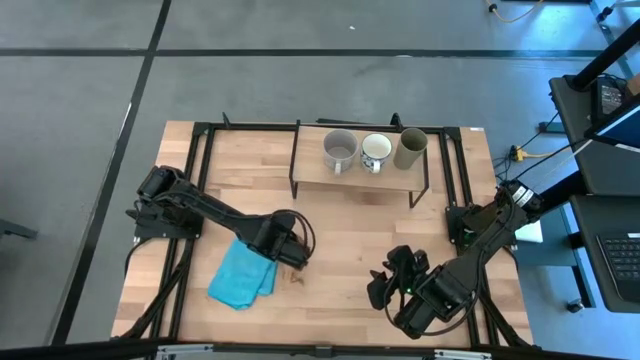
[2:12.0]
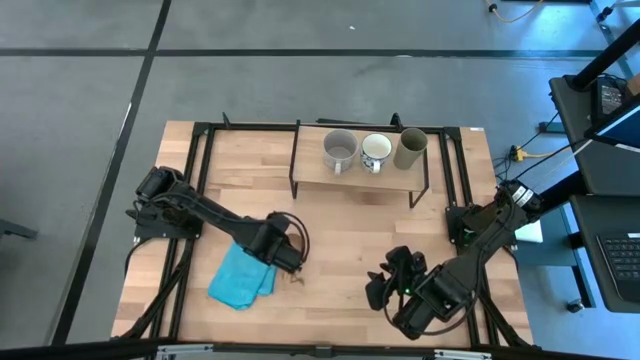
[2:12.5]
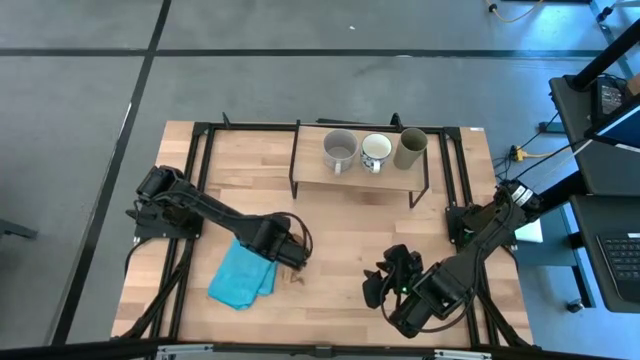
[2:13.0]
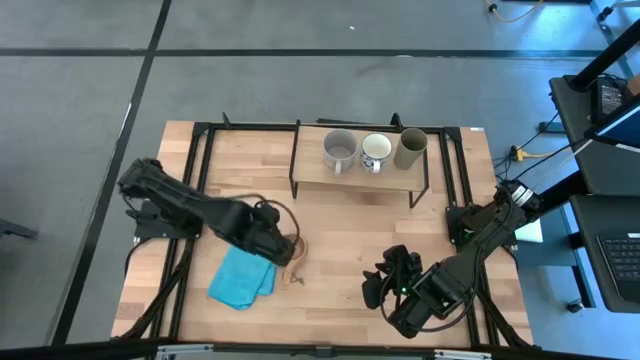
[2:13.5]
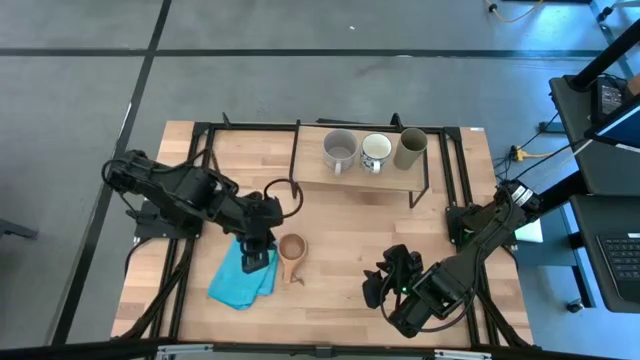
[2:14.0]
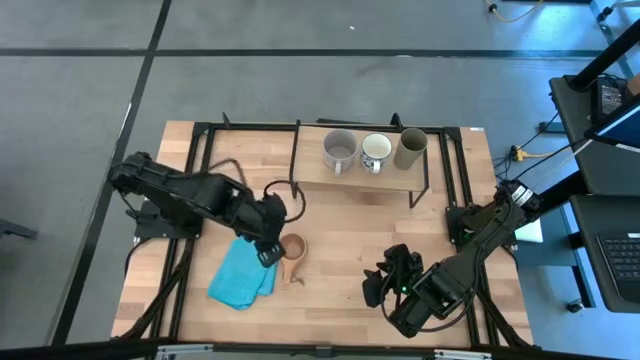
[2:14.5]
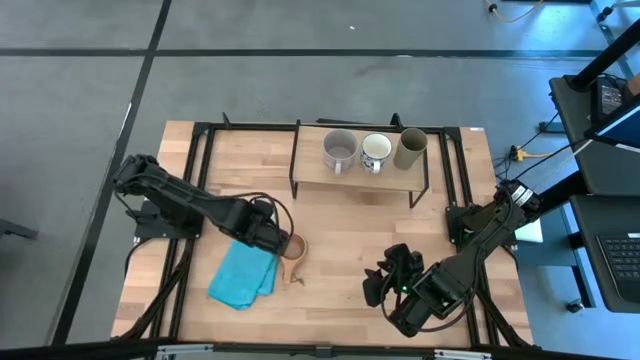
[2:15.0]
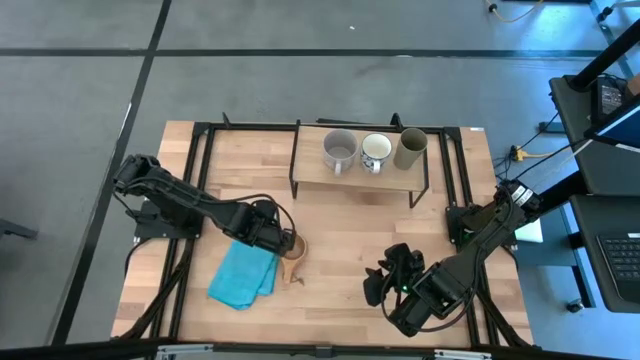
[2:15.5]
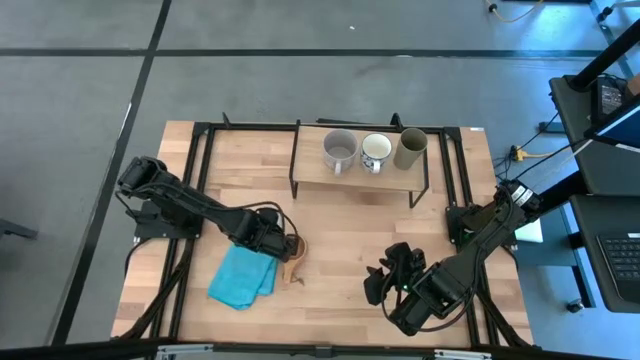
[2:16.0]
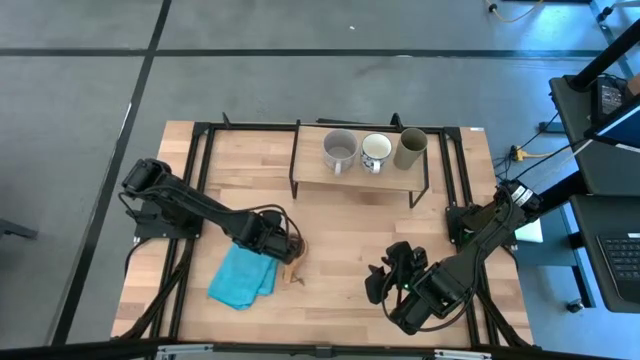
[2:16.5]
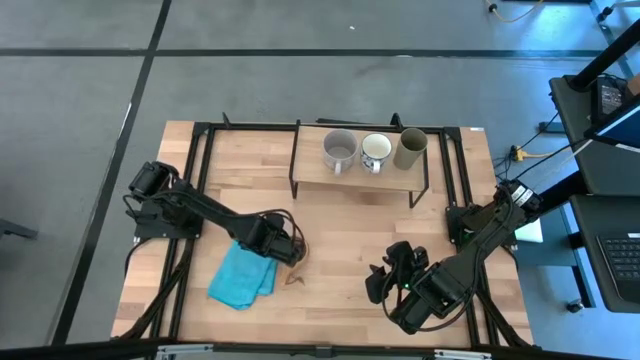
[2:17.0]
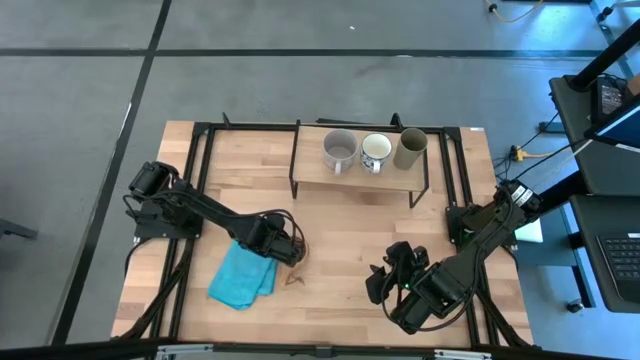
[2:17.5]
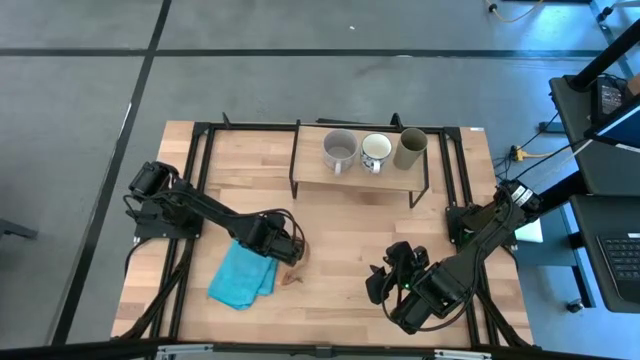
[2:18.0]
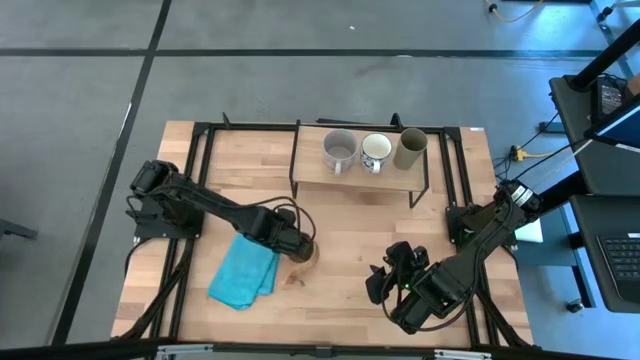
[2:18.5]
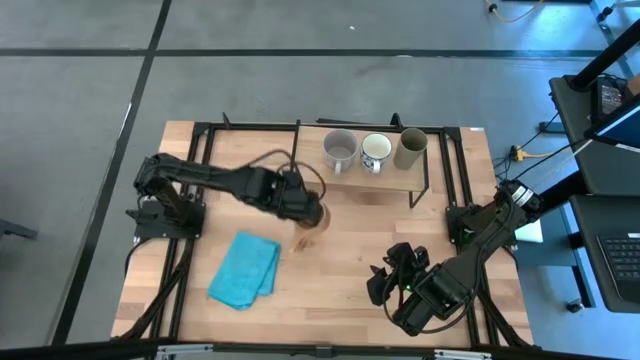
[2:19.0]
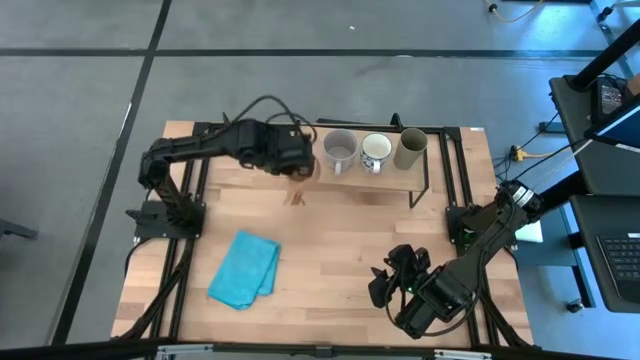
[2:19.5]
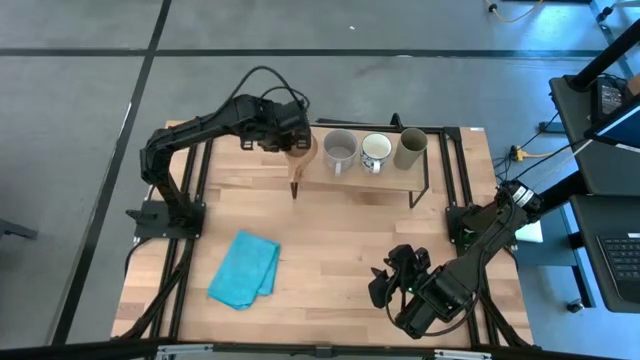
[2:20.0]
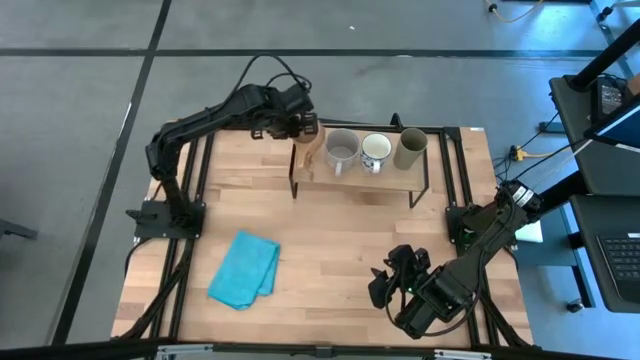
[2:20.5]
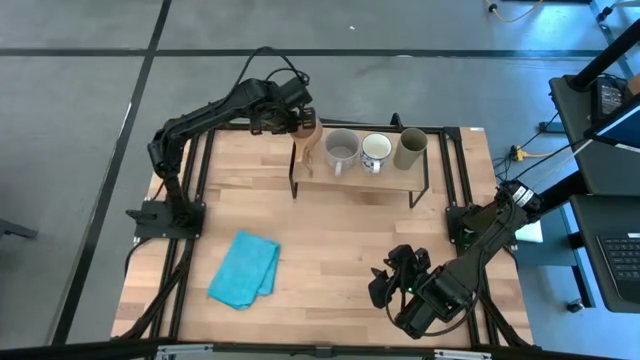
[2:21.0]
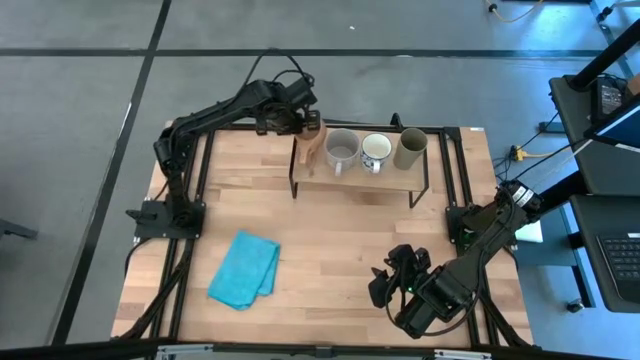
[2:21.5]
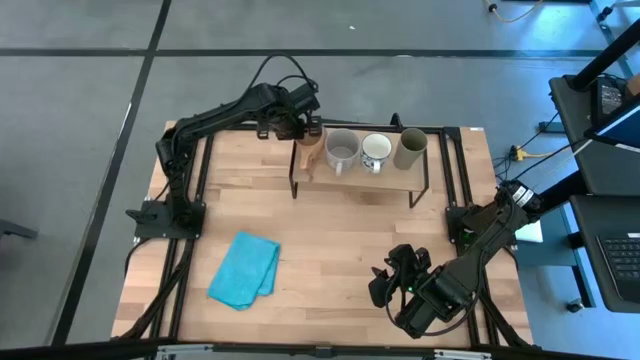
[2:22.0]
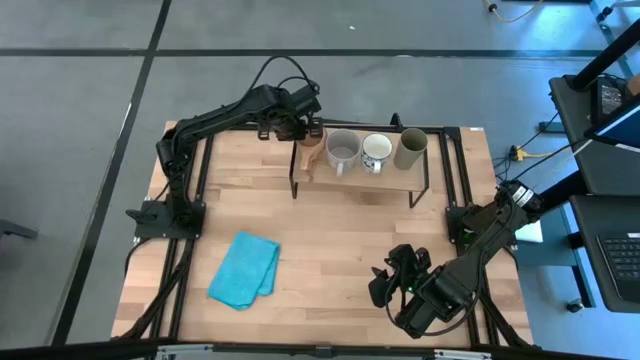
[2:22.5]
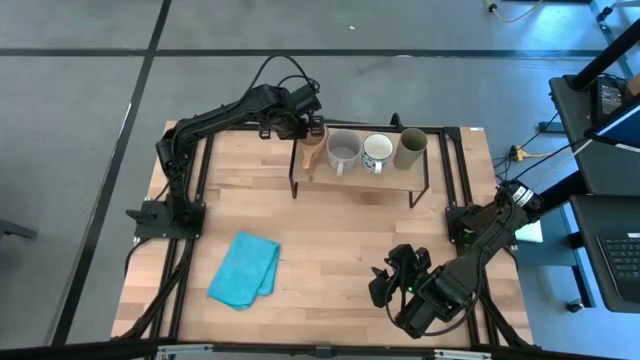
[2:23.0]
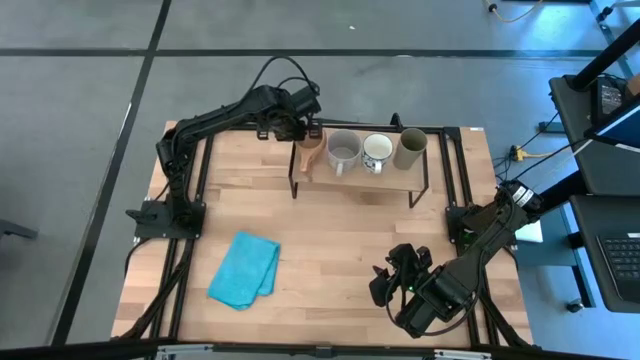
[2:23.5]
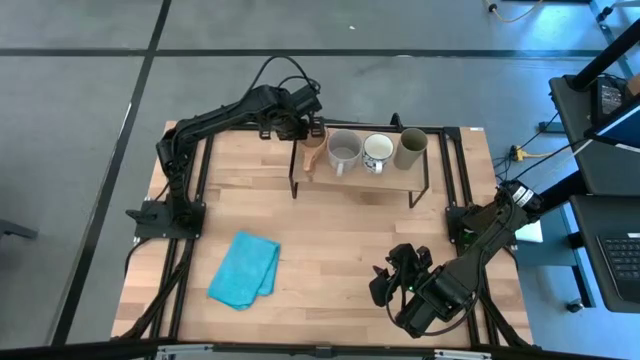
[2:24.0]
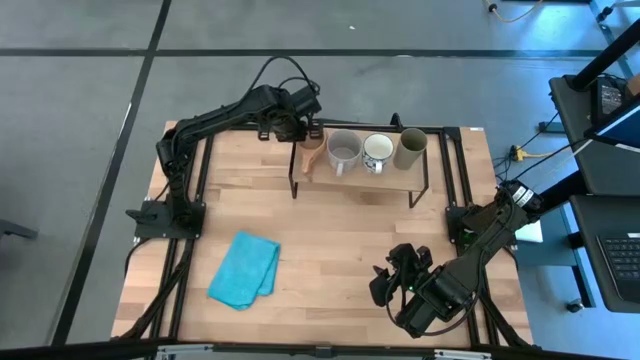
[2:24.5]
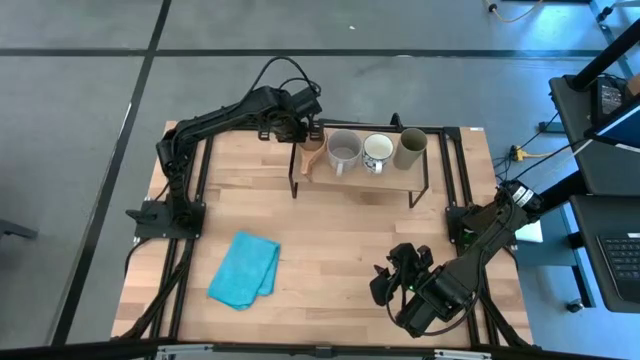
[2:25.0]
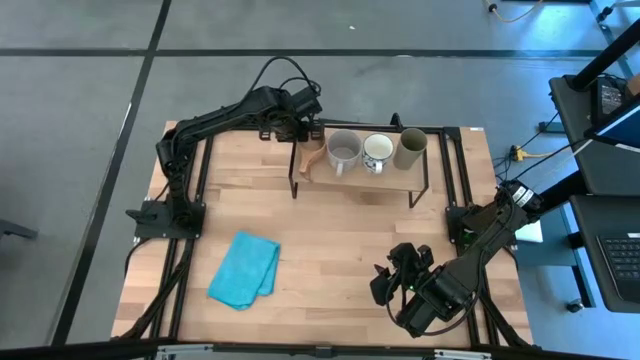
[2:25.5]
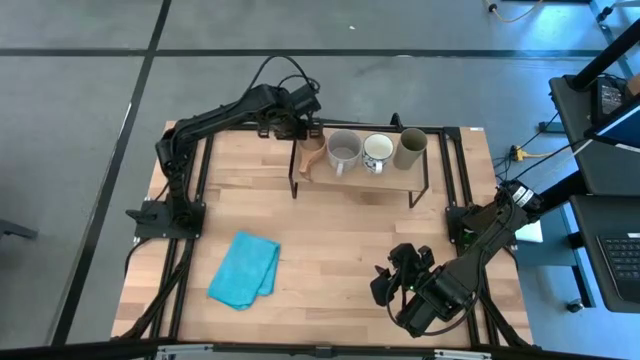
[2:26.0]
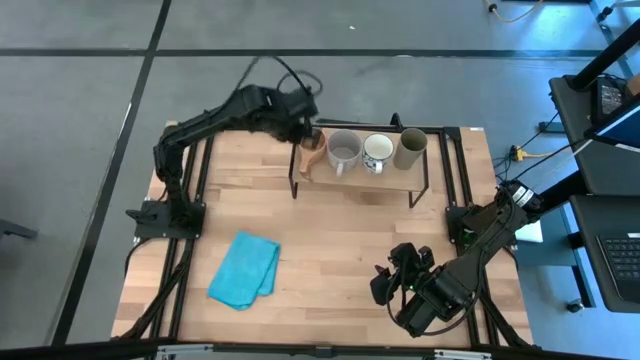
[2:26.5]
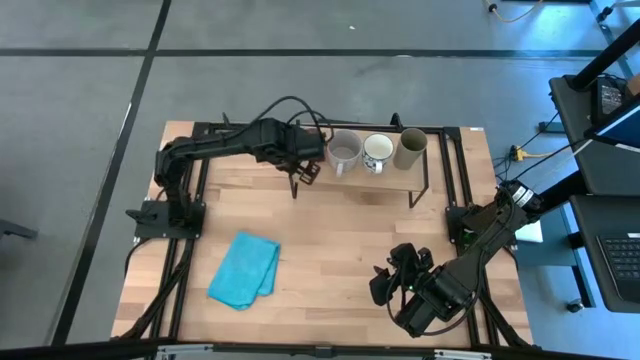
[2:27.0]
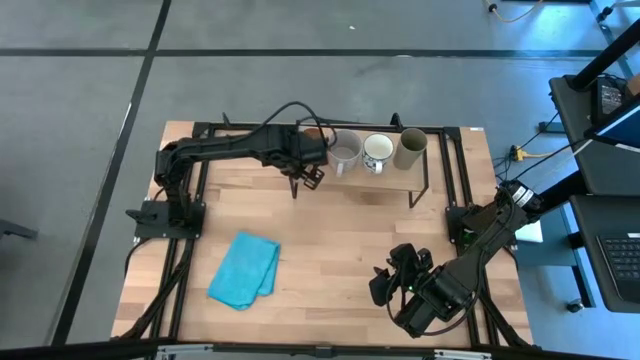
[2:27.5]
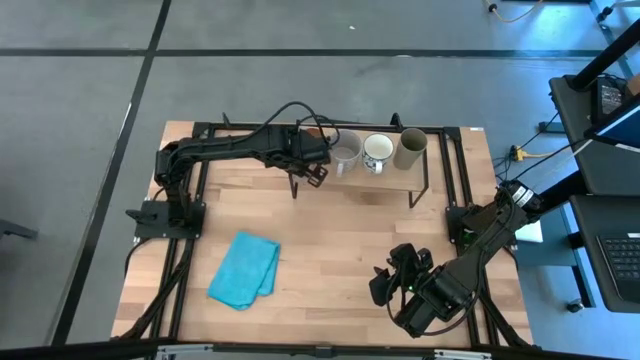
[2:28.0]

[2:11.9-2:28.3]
Task: Stack small to large cups/mugs on shelf
Put the brown mug on the shelf

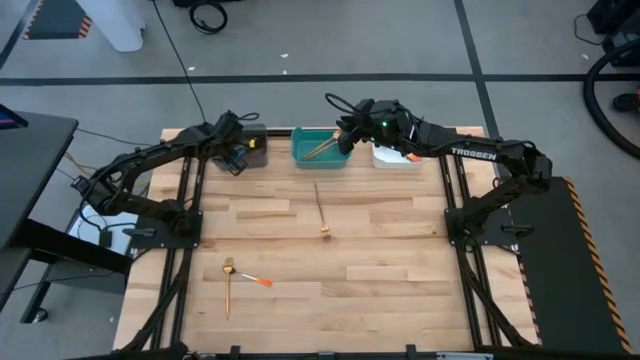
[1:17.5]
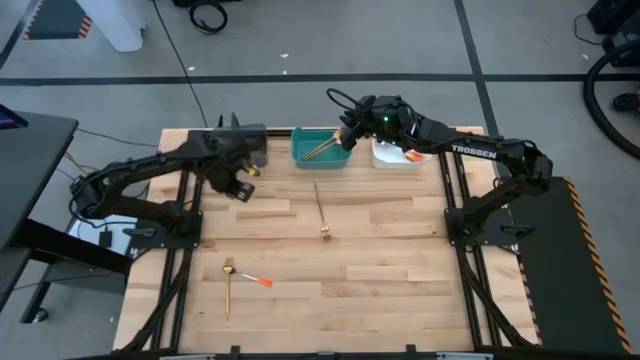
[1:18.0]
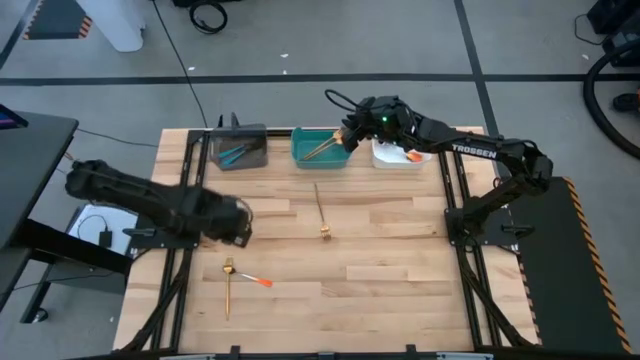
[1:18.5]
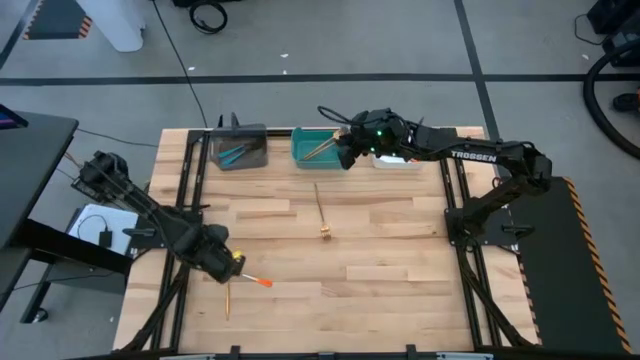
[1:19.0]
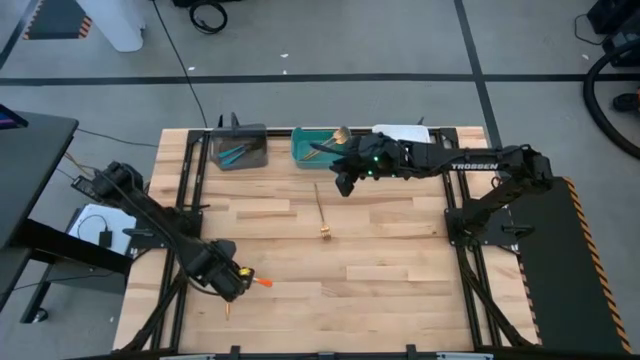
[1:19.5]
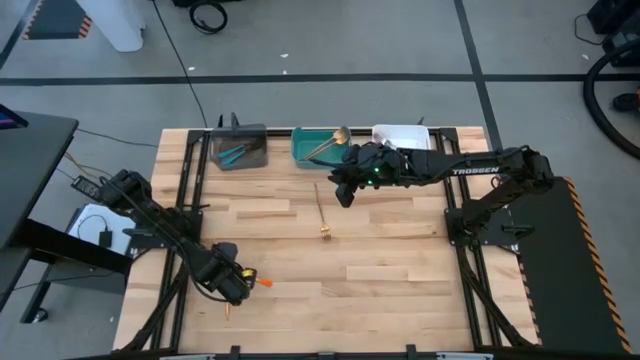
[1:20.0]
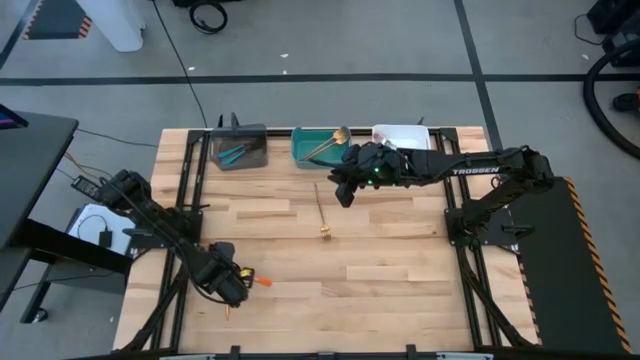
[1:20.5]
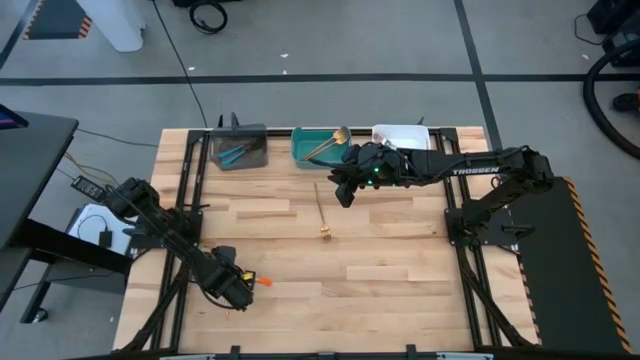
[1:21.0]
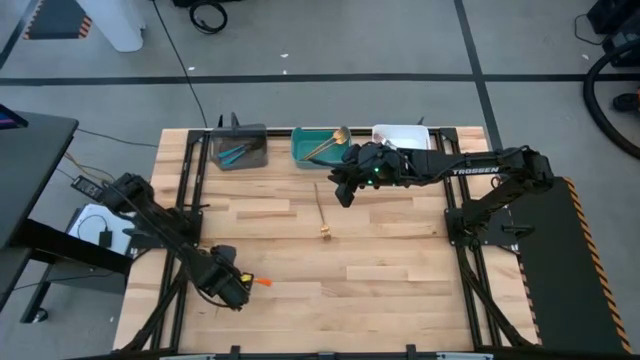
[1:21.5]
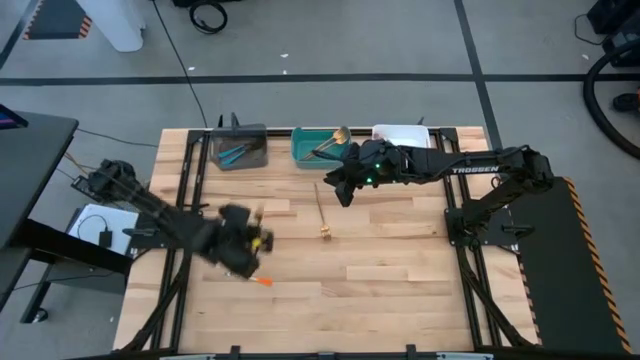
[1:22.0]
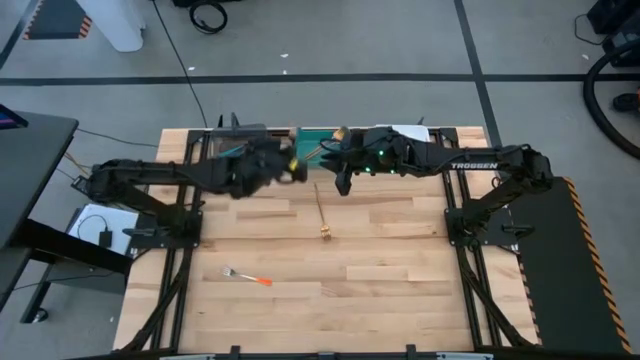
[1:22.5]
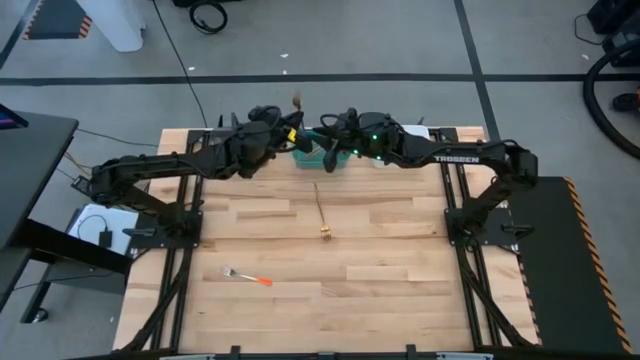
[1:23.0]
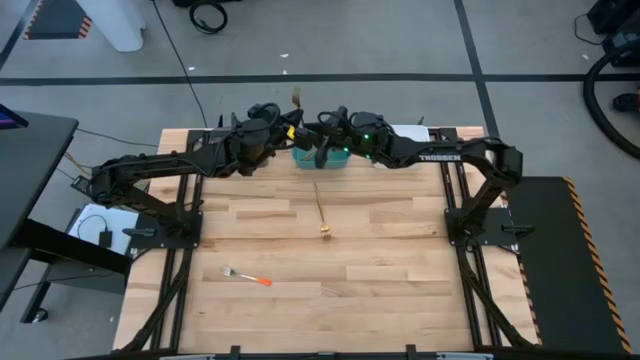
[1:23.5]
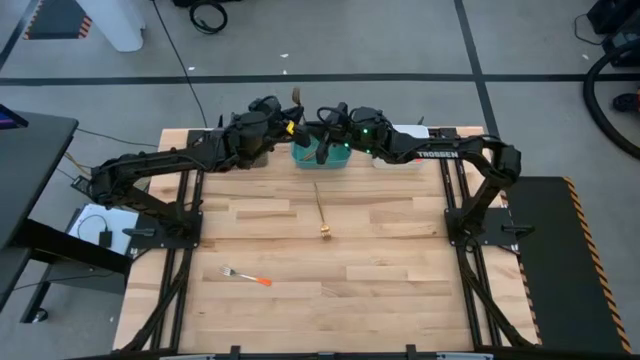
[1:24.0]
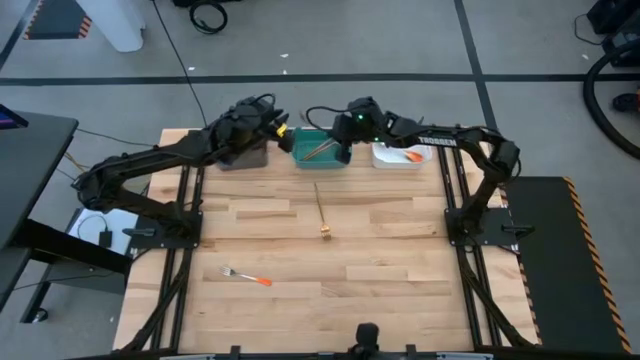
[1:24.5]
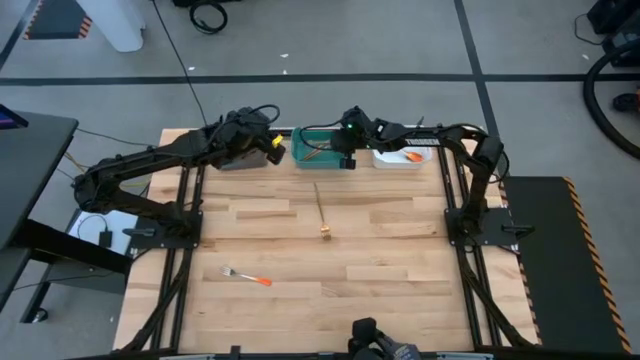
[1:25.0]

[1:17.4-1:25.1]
Task: Sort silverware by color (type)
Put the gold fork into the green bin
